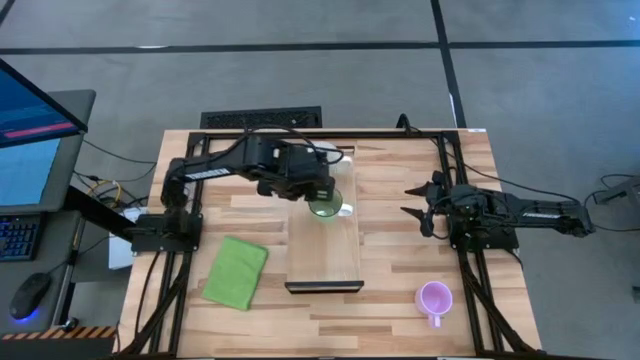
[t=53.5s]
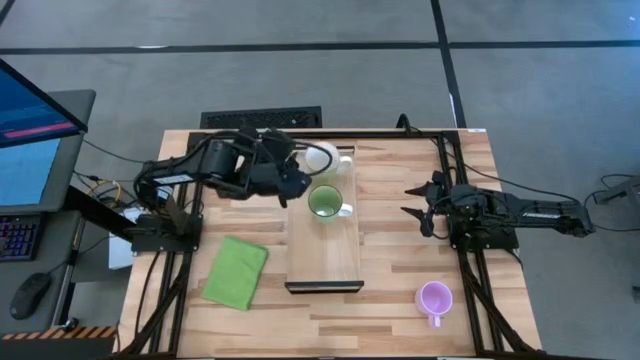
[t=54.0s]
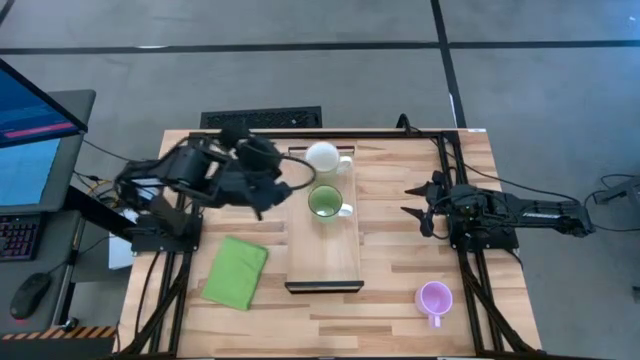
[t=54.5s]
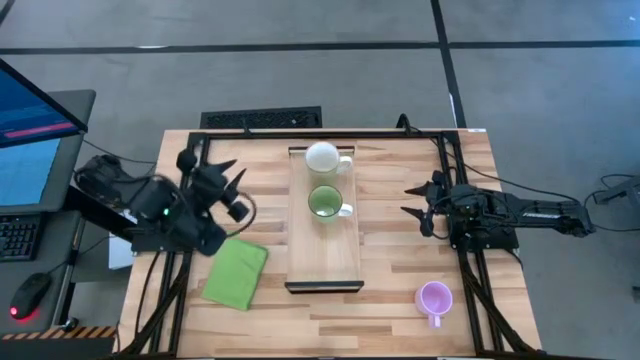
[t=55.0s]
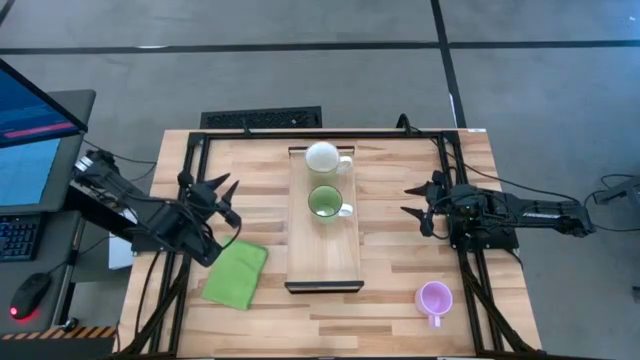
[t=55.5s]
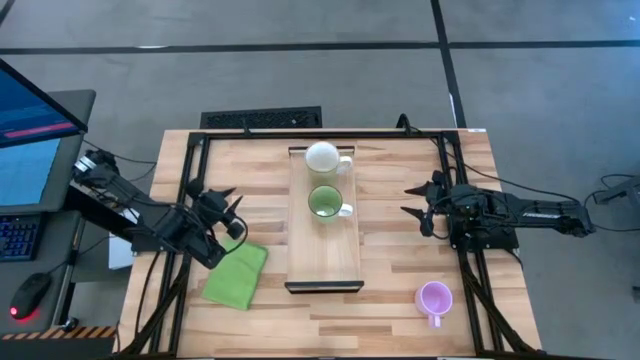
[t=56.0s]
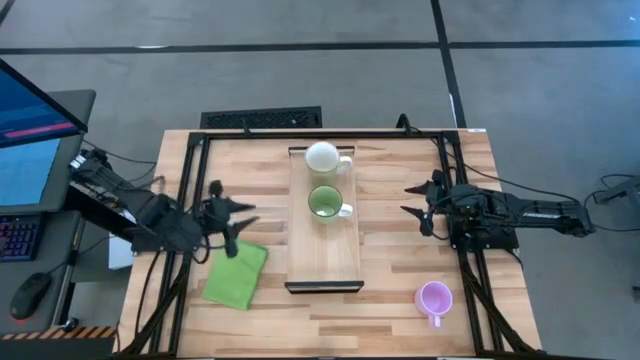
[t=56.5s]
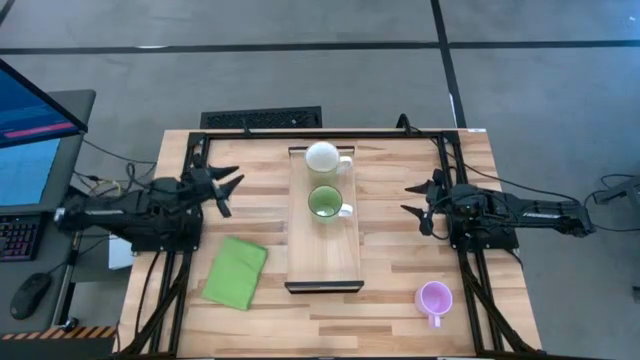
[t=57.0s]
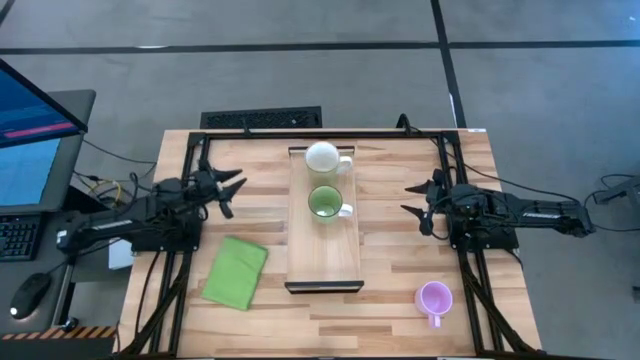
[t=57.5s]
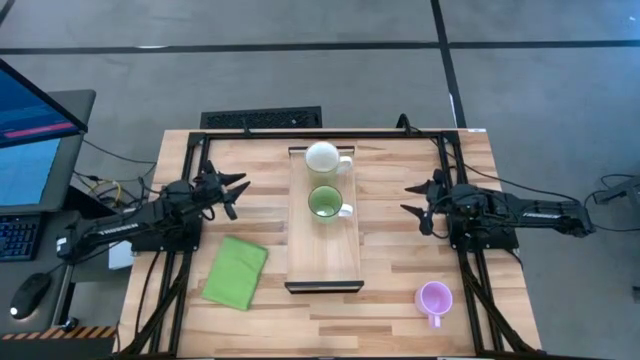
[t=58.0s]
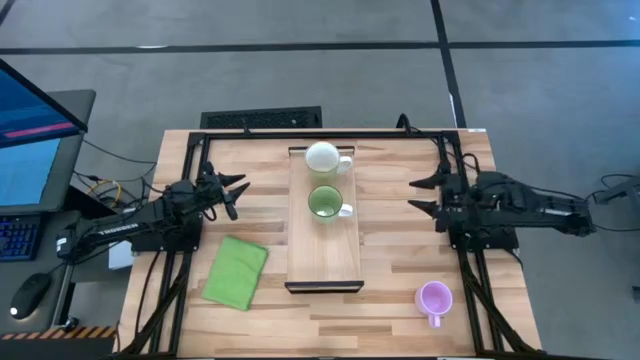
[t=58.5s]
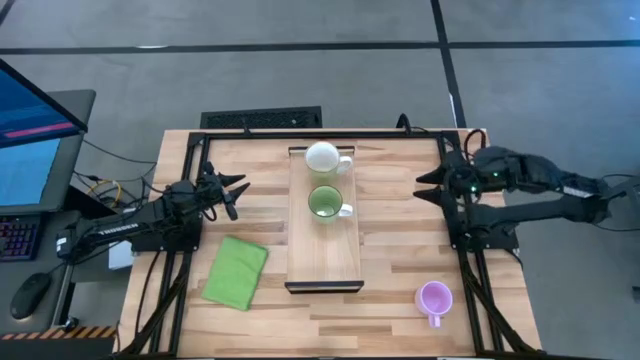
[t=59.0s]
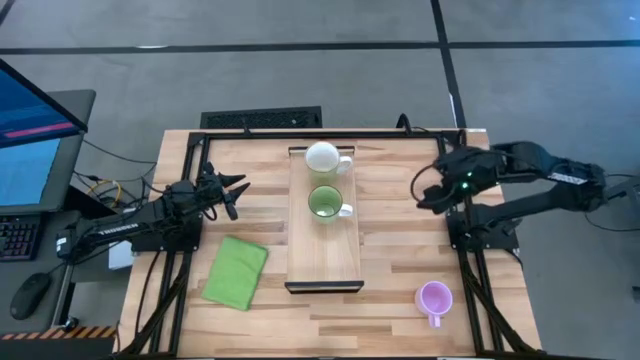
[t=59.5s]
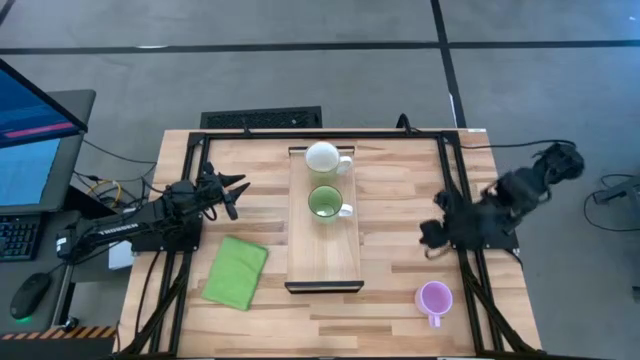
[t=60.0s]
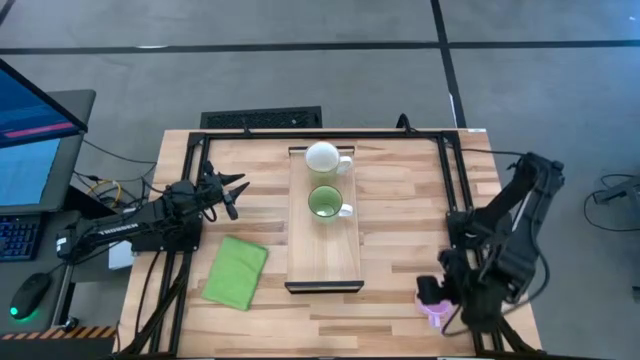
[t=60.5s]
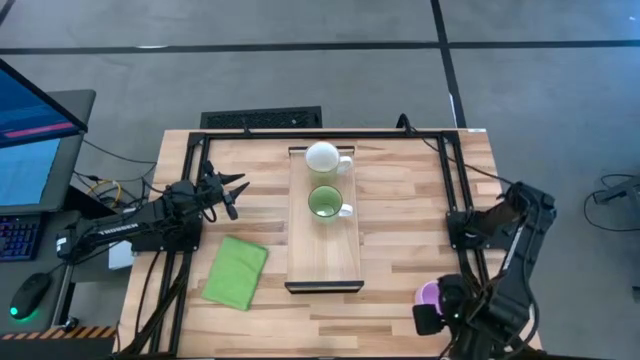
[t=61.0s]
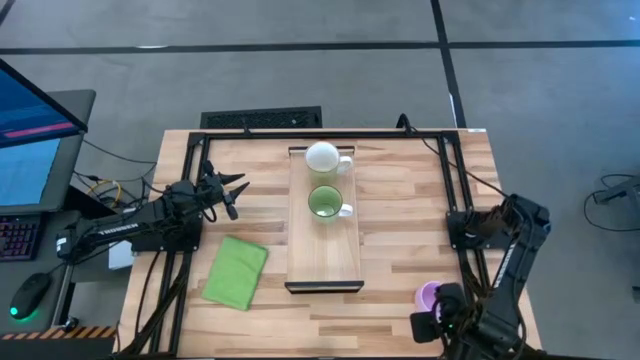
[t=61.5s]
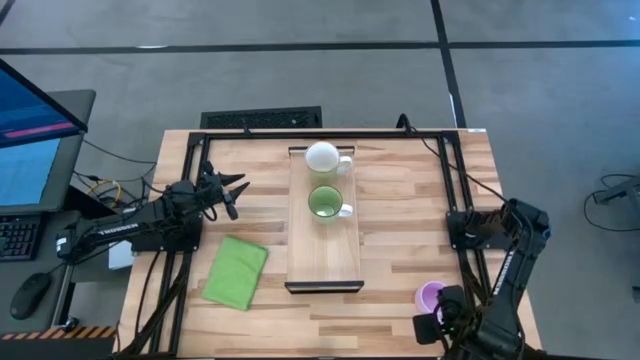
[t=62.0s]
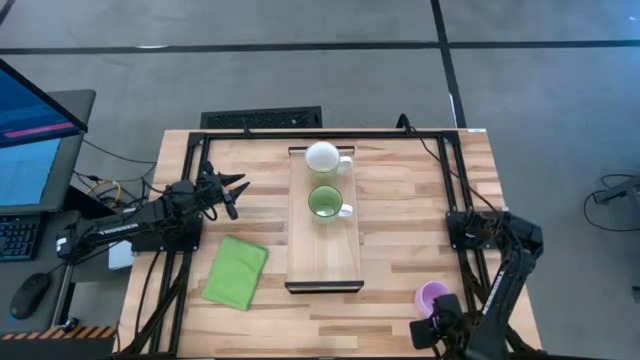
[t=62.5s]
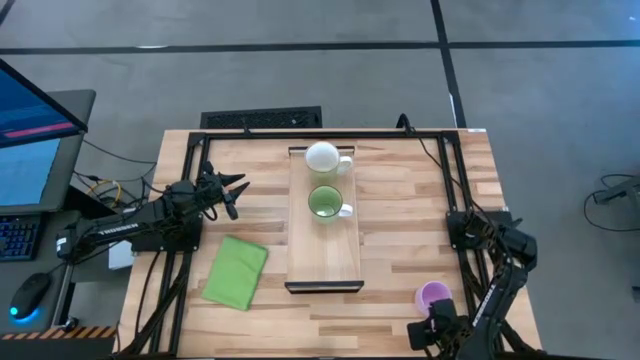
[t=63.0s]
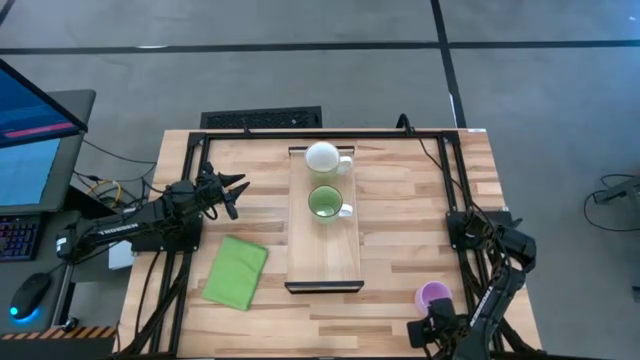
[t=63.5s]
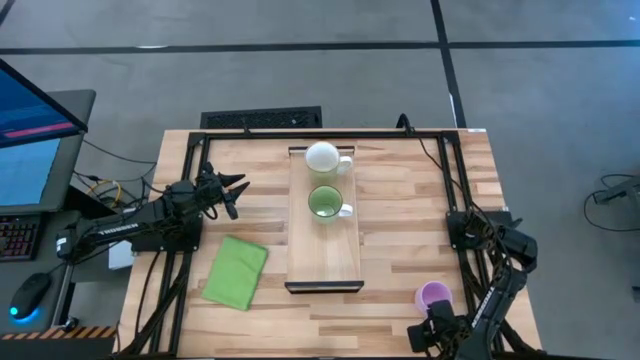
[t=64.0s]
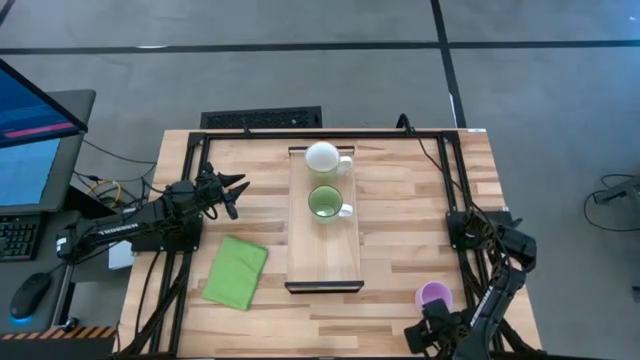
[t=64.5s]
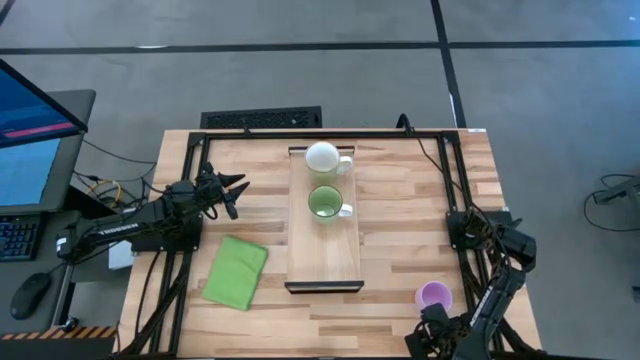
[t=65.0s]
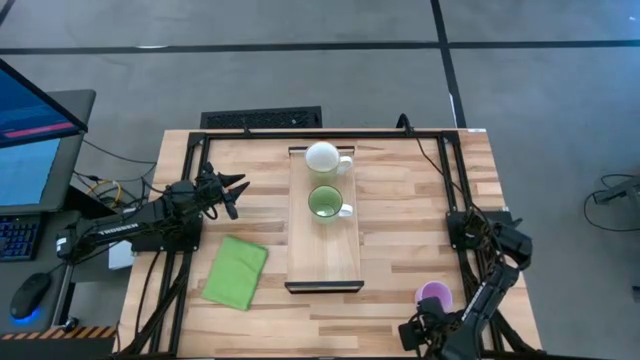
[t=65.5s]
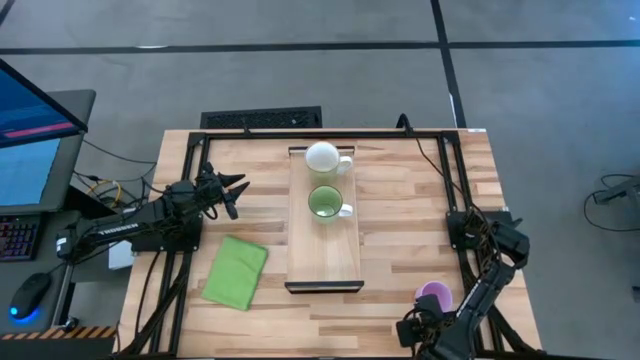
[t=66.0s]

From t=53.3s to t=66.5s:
Task: Stack small to large cups/mugs on shelf
Put the pink mug on the shelf
